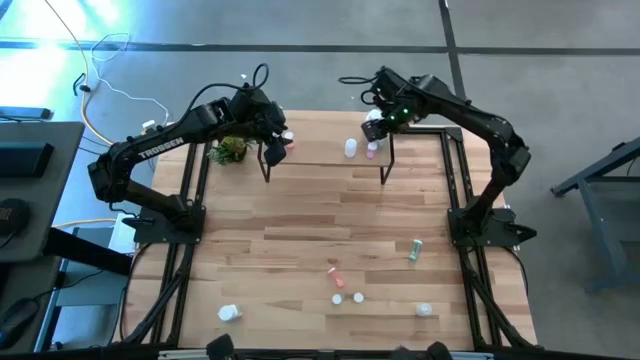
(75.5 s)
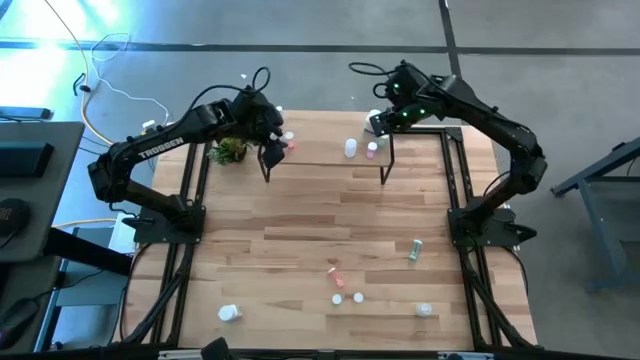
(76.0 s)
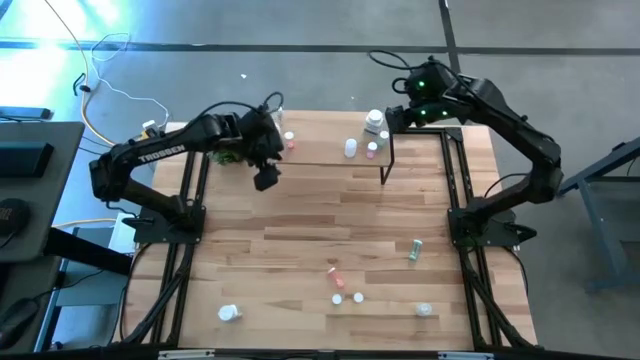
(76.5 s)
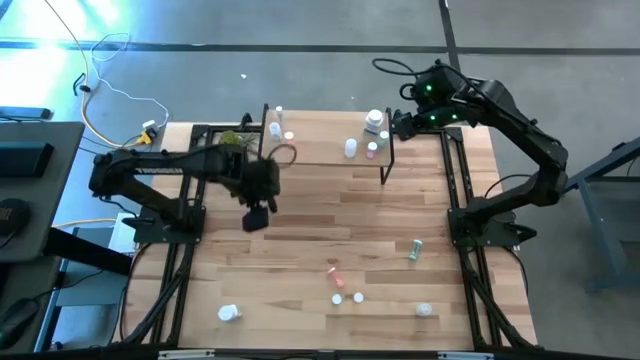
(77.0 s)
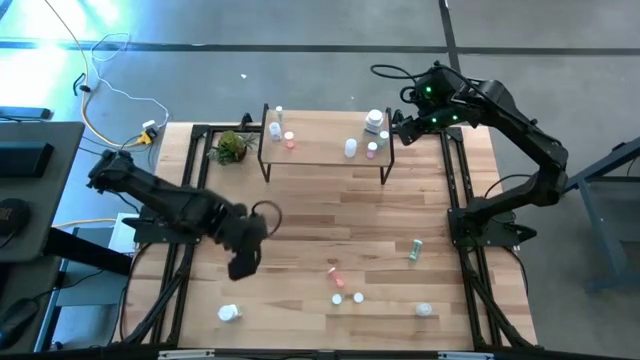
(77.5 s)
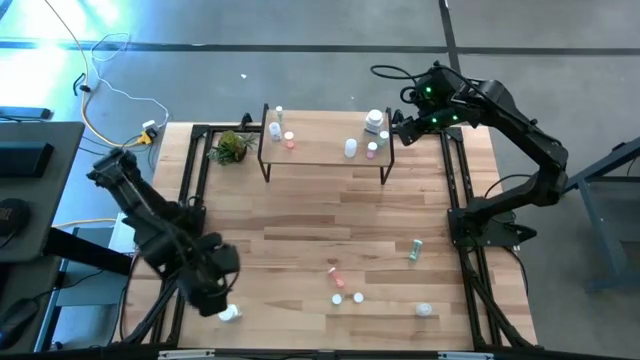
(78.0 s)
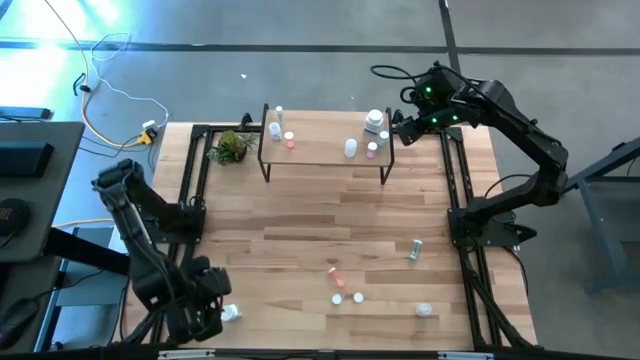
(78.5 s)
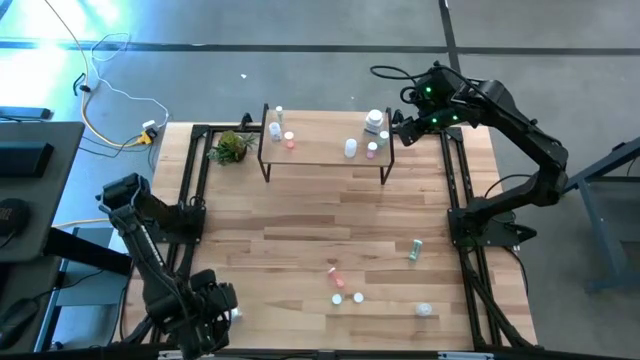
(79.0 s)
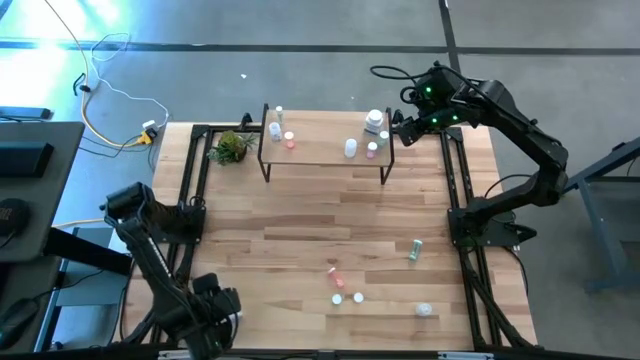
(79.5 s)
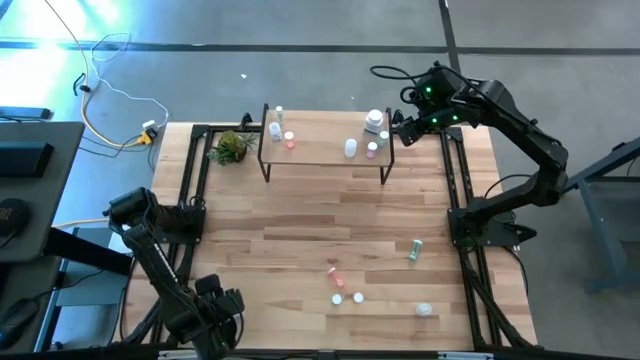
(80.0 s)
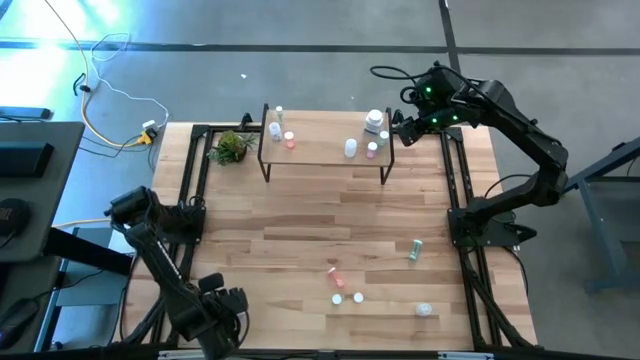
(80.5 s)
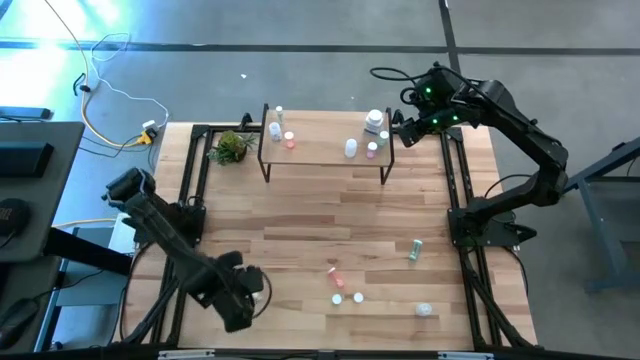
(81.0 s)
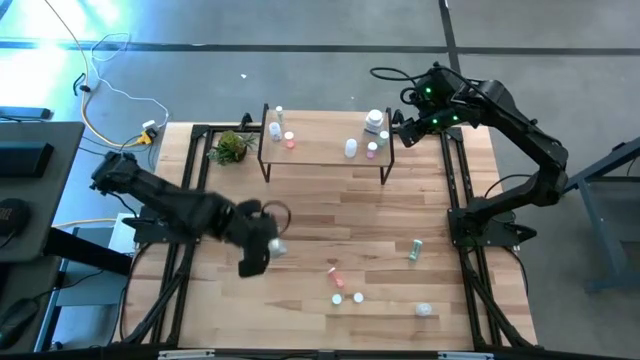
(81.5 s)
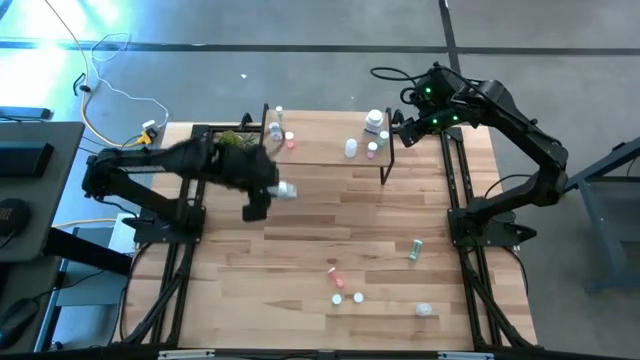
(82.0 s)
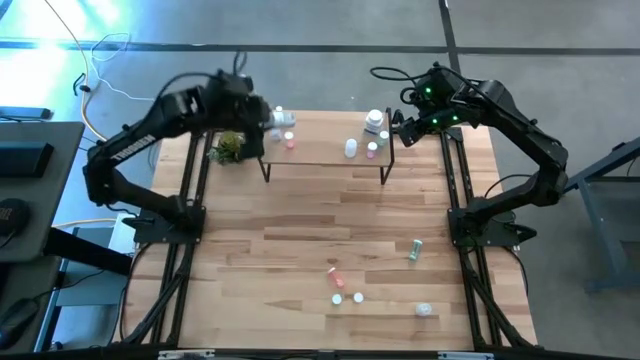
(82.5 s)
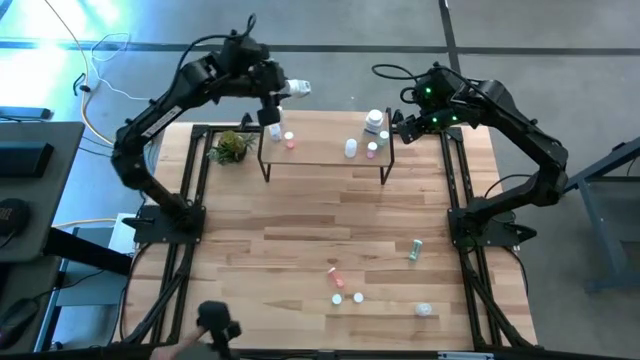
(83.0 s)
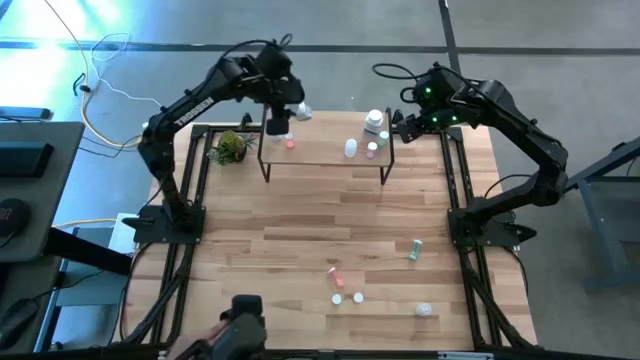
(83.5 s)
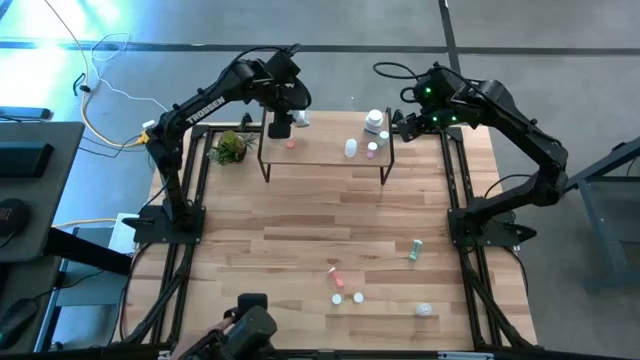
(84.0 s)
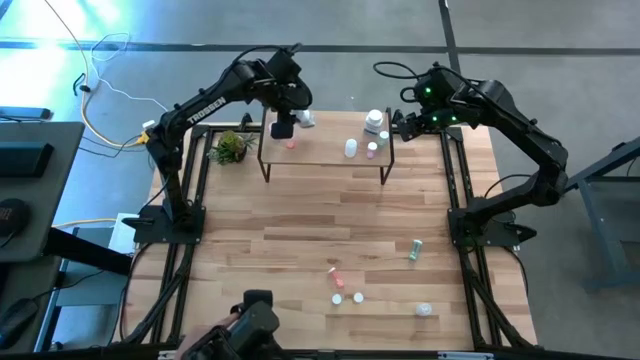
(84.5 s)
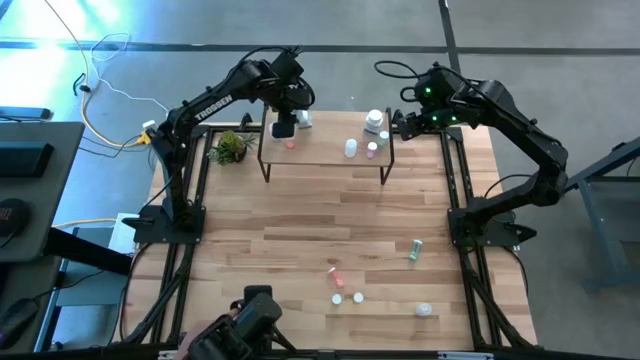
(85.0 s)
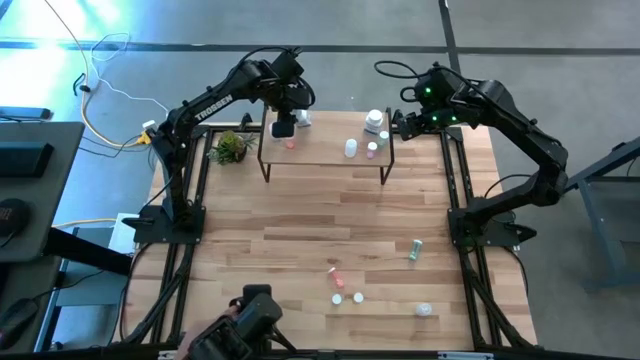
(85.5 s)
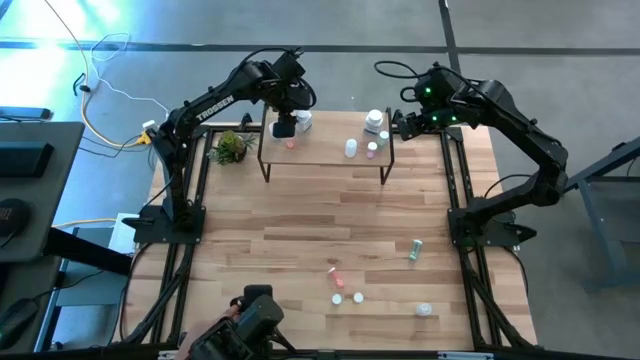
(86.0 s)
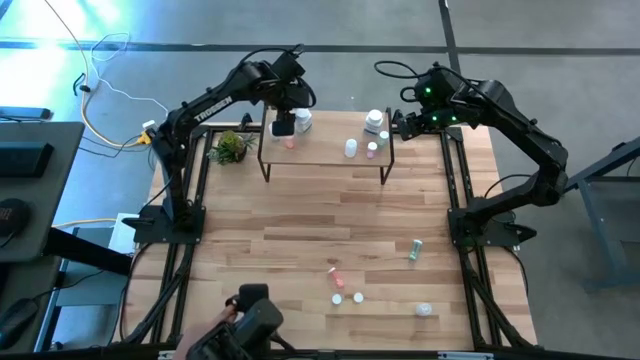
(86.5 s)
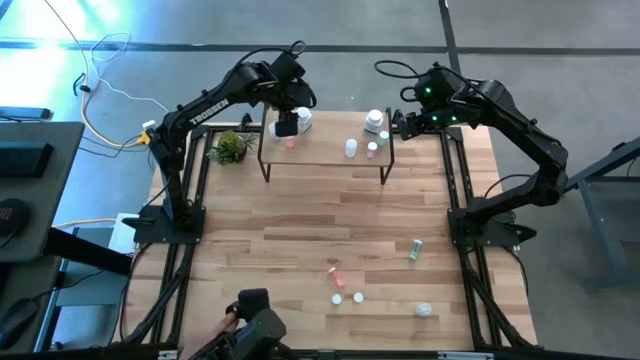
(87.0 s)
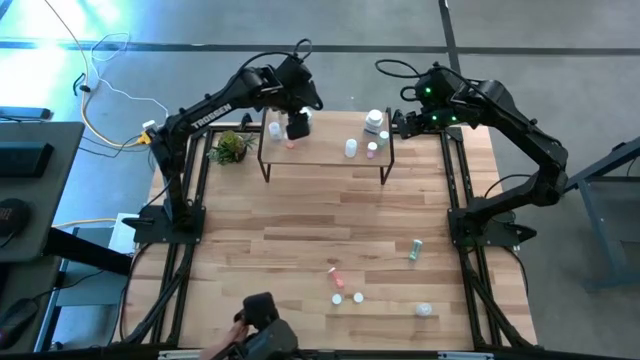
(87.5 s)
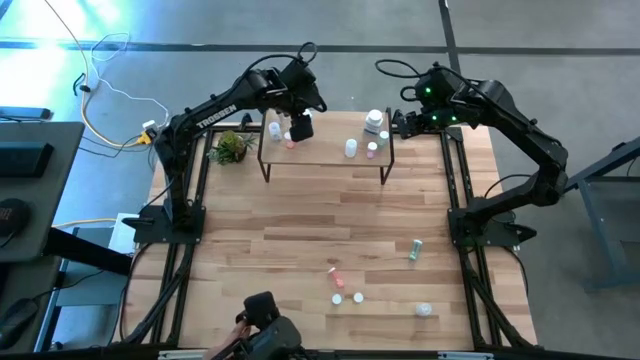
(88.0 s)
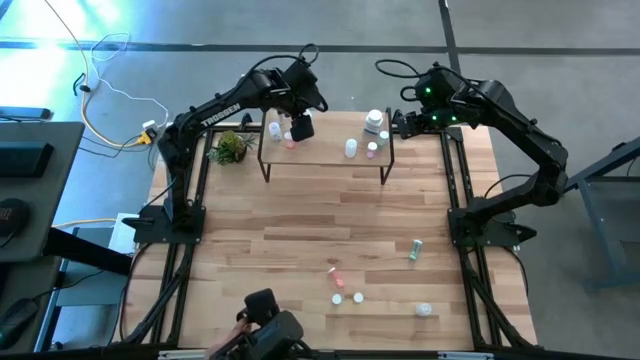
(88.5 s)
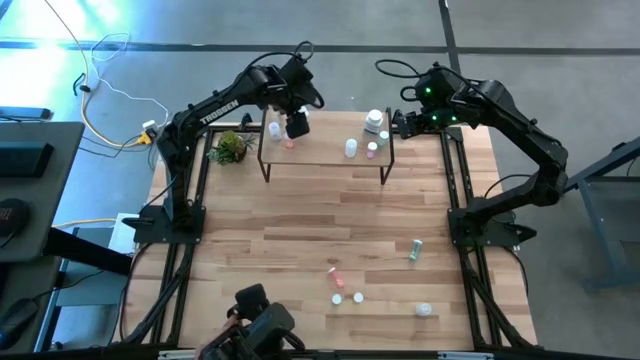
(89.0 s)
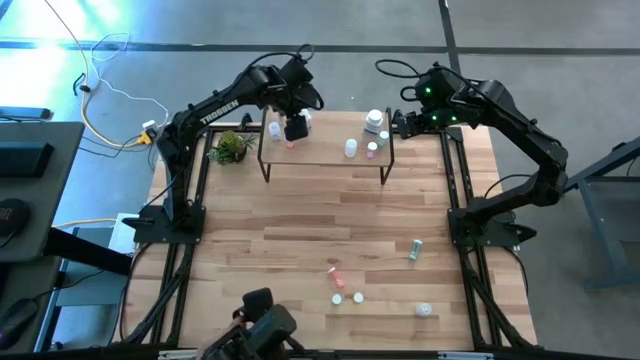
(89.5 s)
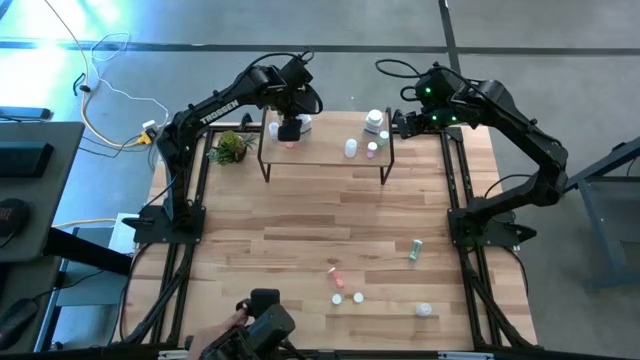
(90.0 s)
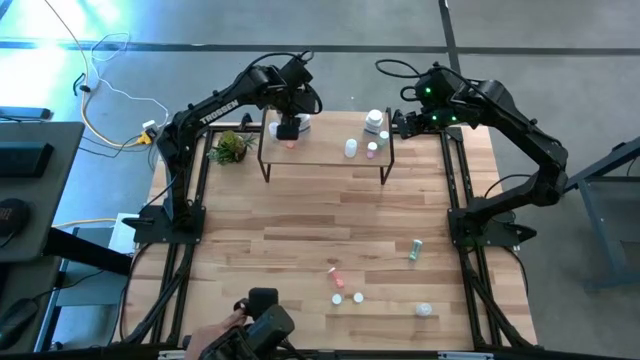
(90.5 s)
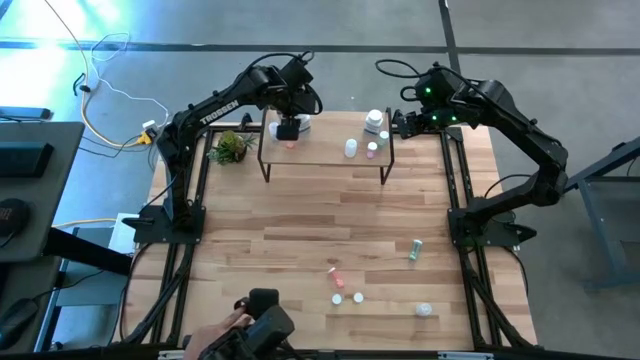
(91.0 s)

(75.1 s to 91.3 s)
Task: Pick and place medicine bottles onto shelf by color
Put the white medicine bottle on the shelf

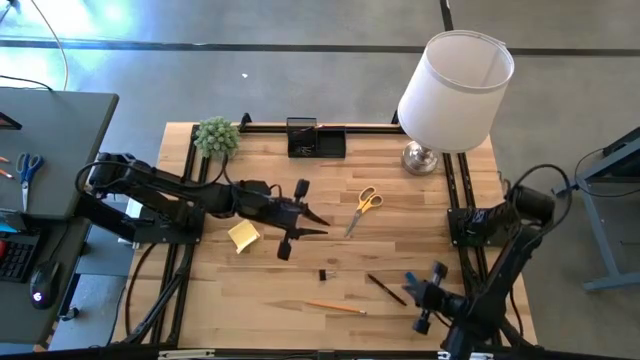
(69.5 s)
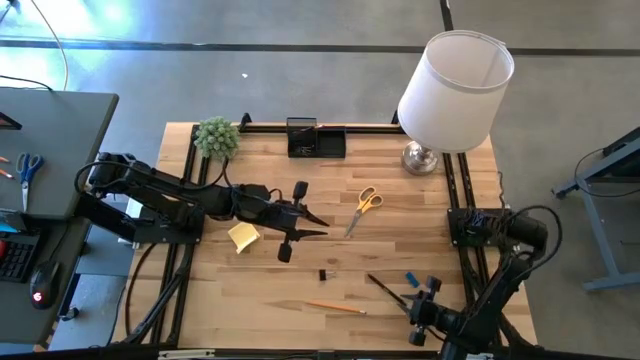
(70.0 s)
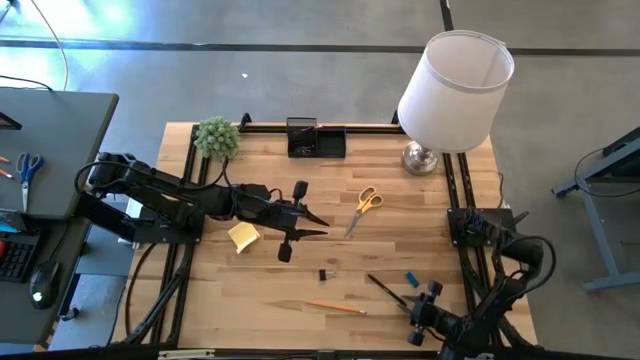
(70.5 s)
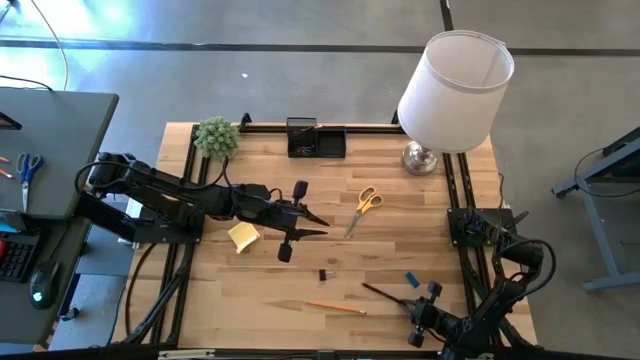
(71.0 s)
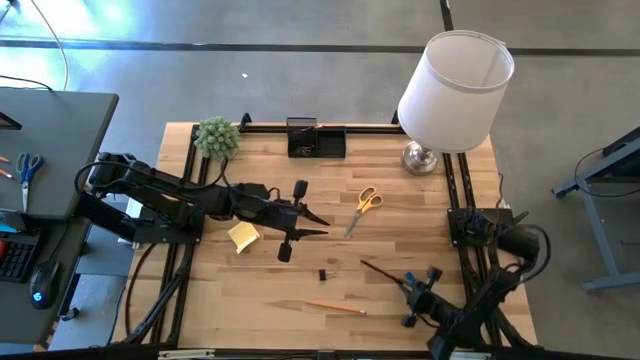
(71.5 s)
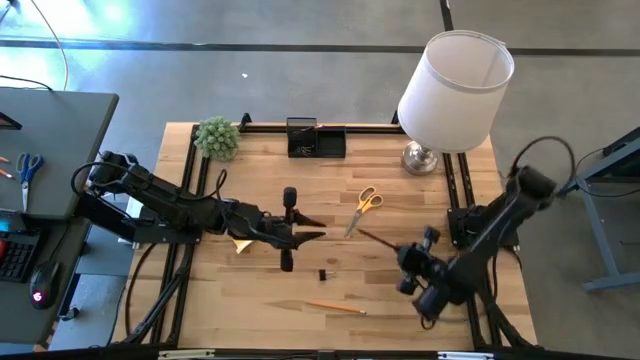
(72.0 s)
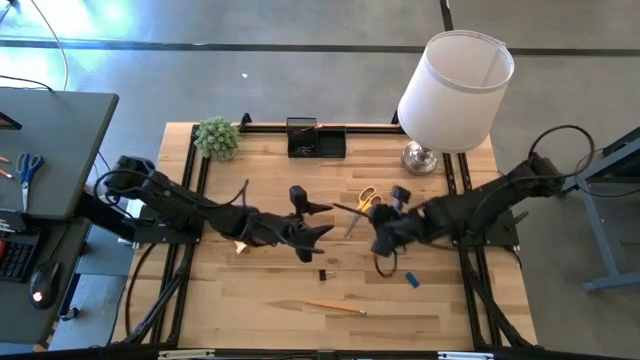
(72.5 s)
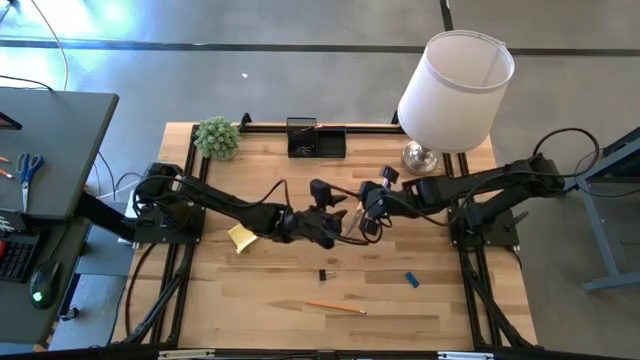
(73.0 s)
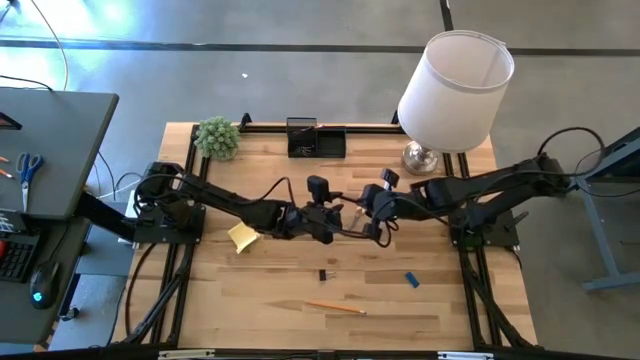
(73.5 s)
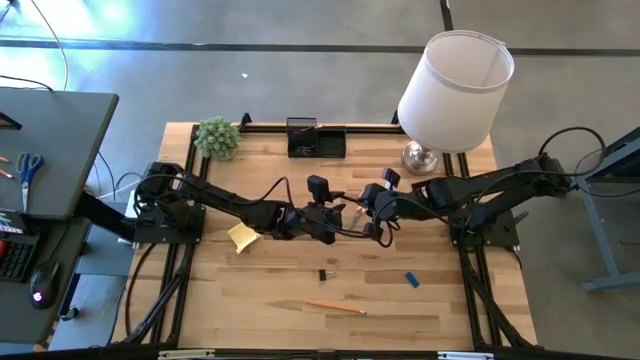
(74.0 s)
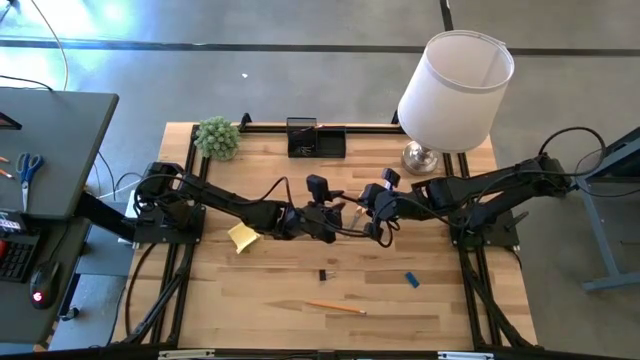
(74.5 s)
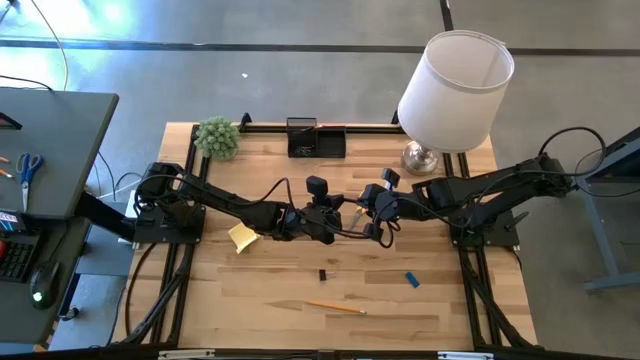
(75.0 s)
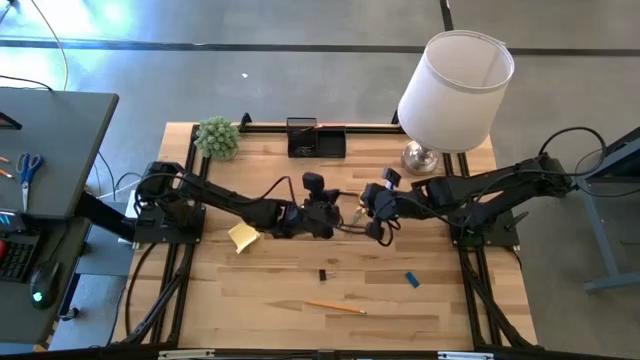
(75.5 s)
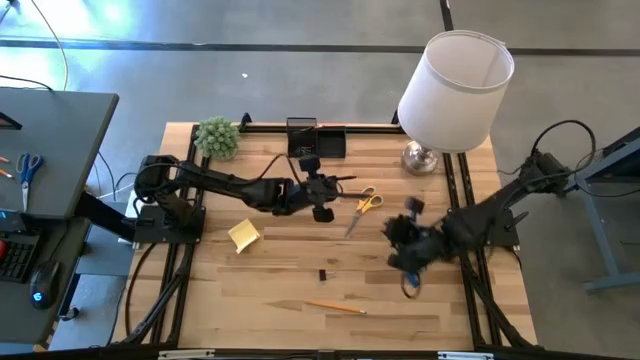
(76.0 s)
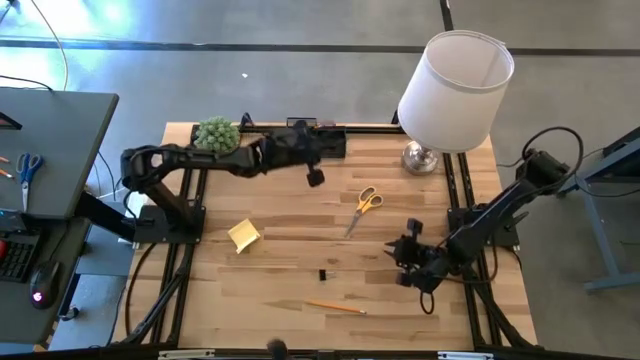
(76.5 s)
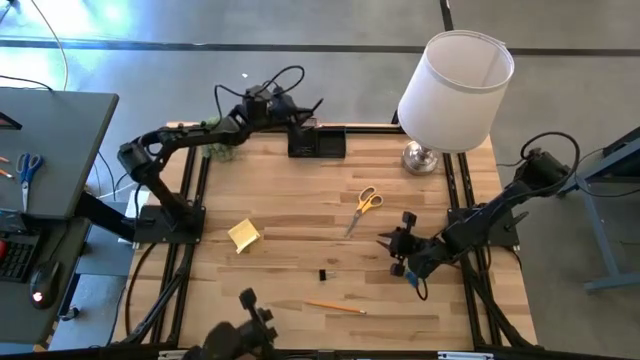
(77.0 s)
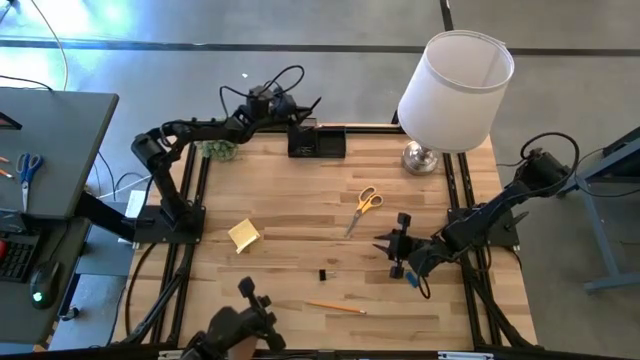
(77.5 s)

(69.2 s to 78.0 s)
Task: Pick and place office supplies into organizer
Put the black pen into the top left slot of the desk organizer
